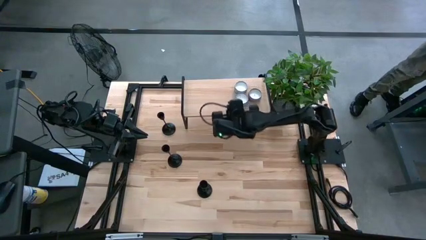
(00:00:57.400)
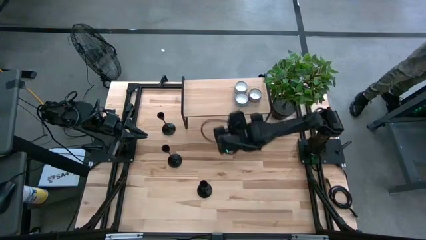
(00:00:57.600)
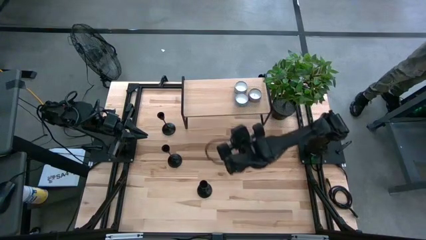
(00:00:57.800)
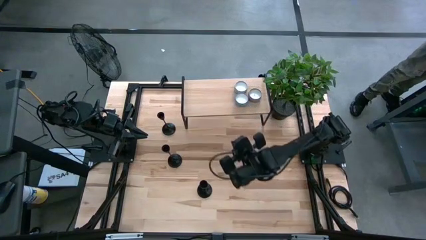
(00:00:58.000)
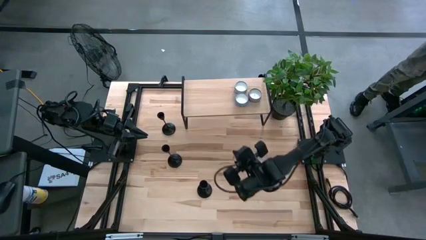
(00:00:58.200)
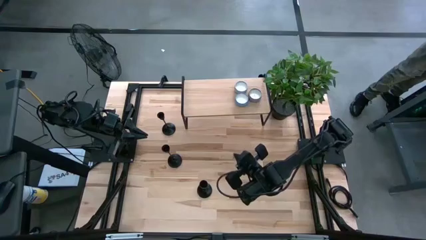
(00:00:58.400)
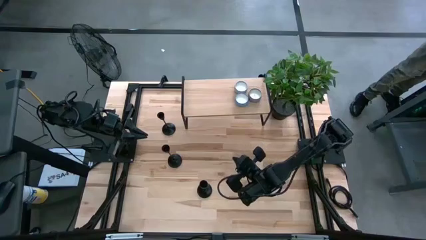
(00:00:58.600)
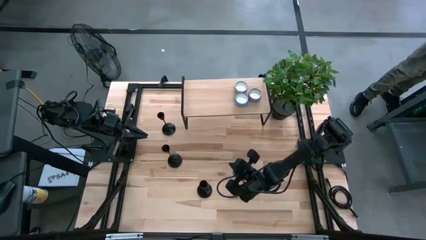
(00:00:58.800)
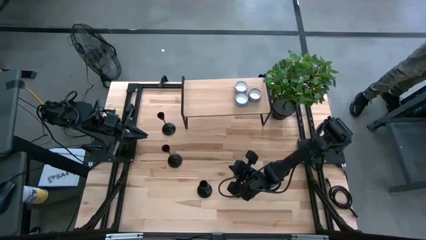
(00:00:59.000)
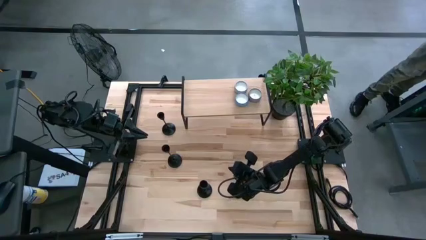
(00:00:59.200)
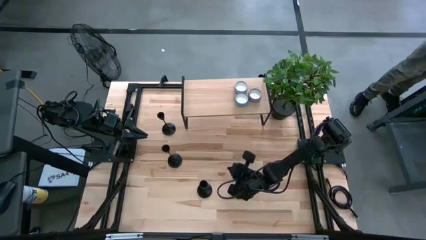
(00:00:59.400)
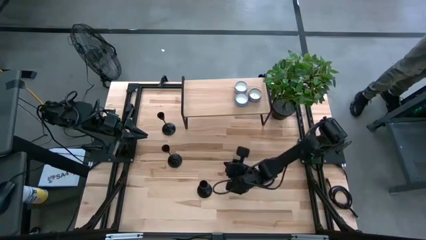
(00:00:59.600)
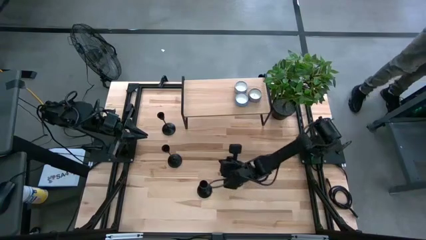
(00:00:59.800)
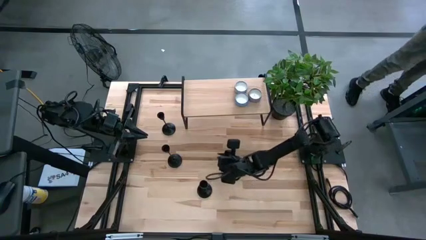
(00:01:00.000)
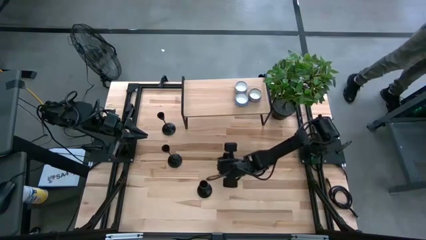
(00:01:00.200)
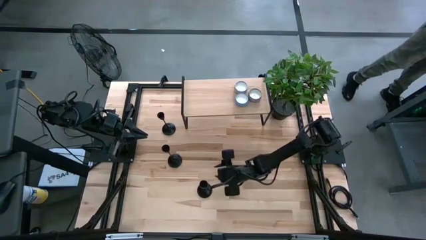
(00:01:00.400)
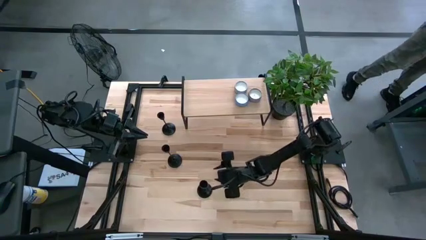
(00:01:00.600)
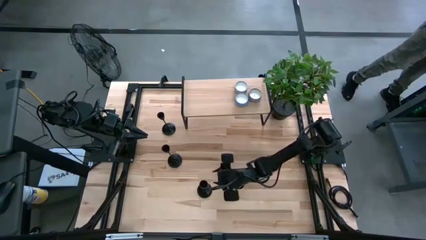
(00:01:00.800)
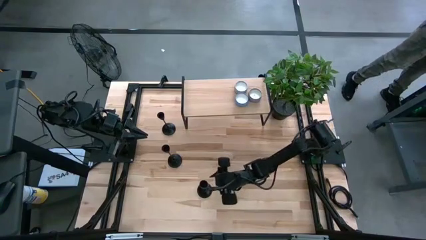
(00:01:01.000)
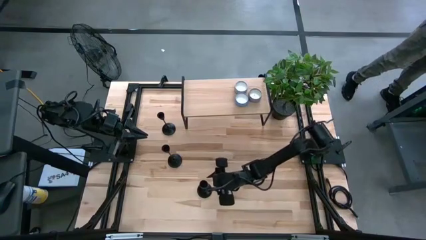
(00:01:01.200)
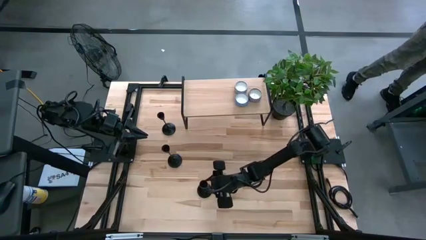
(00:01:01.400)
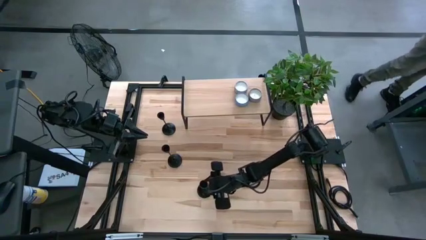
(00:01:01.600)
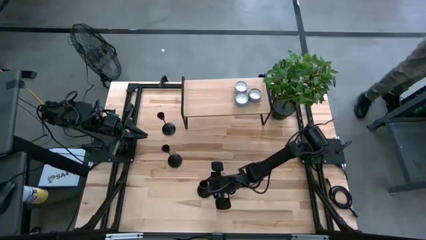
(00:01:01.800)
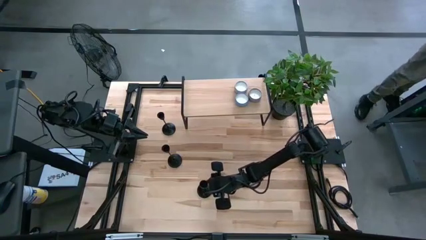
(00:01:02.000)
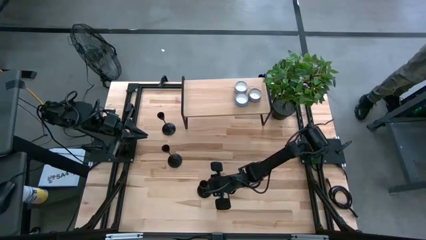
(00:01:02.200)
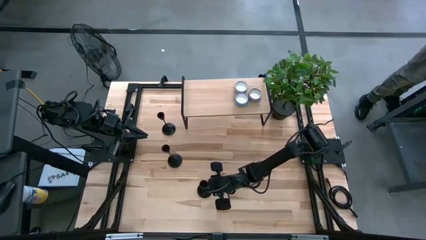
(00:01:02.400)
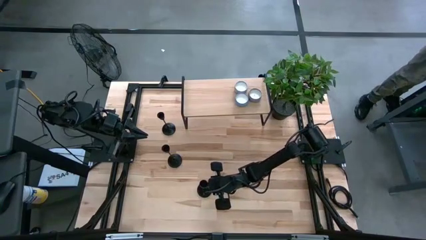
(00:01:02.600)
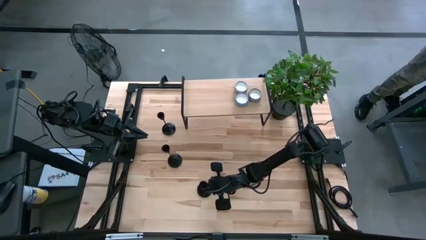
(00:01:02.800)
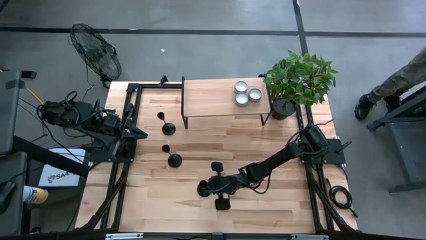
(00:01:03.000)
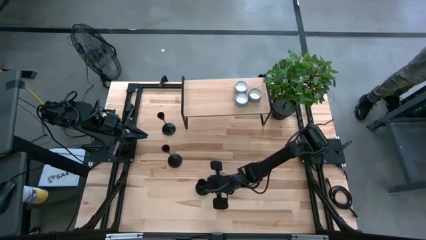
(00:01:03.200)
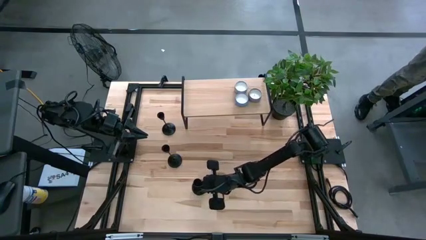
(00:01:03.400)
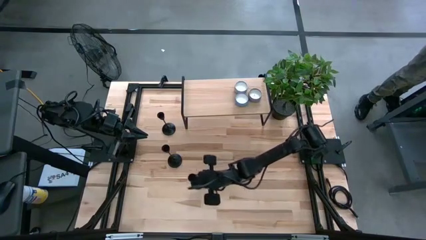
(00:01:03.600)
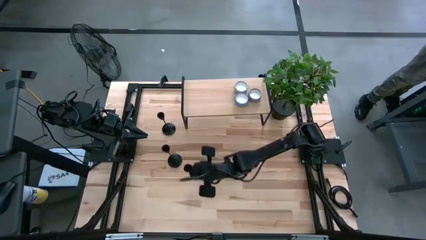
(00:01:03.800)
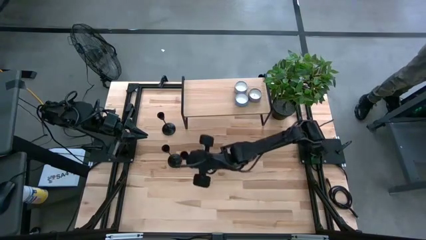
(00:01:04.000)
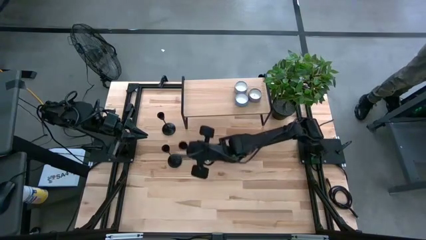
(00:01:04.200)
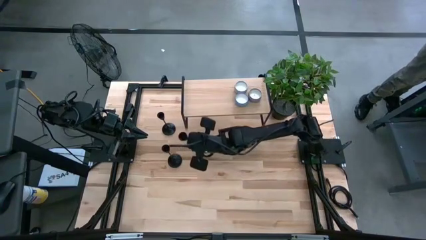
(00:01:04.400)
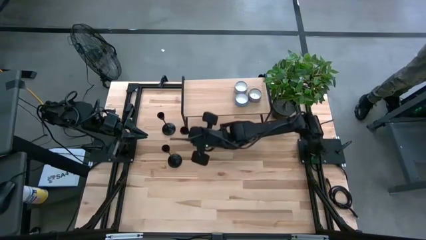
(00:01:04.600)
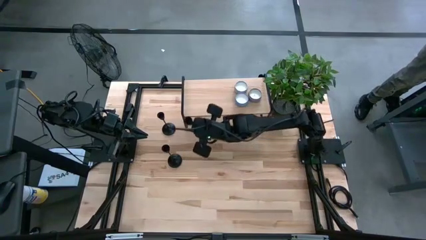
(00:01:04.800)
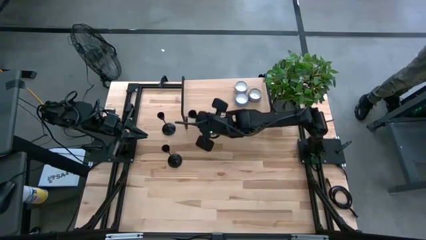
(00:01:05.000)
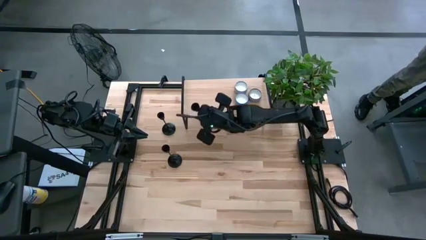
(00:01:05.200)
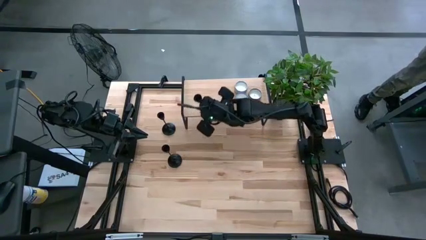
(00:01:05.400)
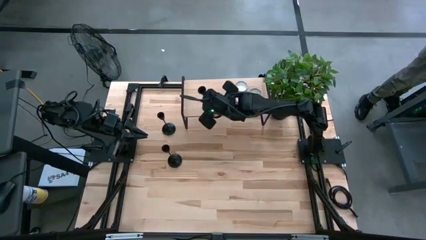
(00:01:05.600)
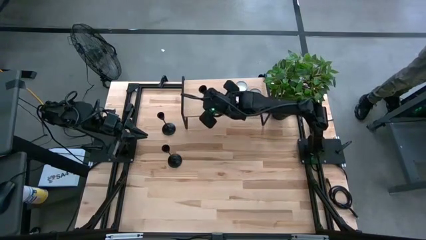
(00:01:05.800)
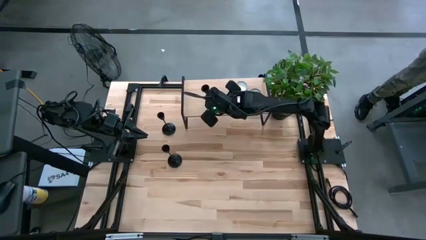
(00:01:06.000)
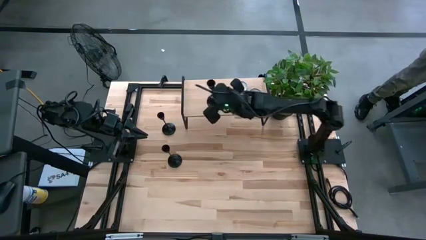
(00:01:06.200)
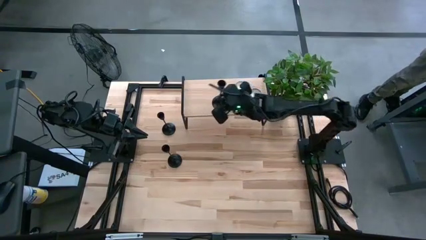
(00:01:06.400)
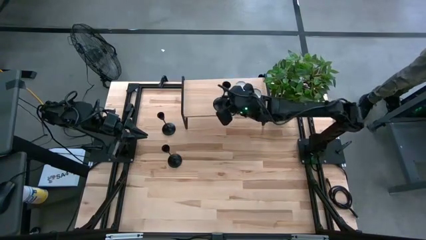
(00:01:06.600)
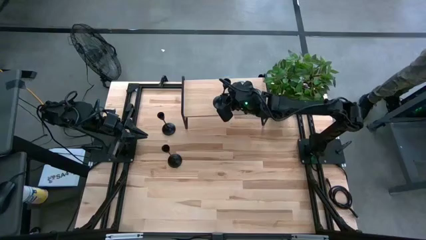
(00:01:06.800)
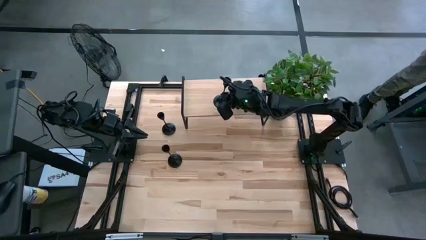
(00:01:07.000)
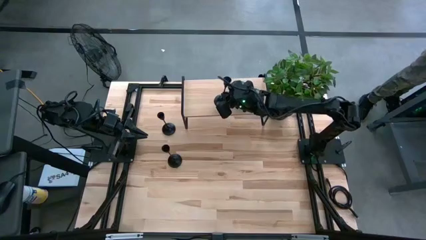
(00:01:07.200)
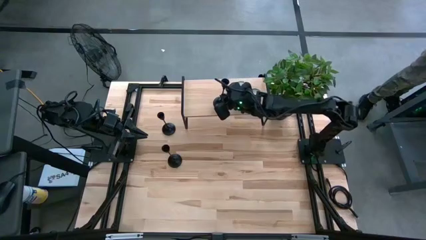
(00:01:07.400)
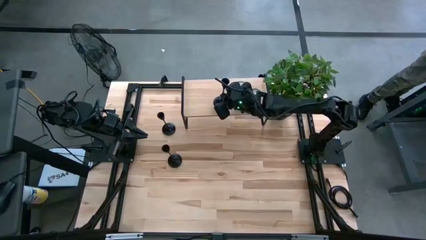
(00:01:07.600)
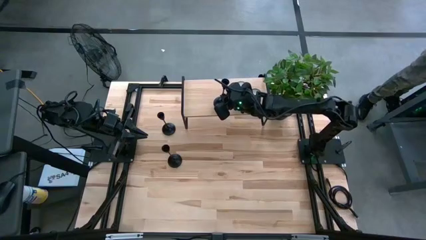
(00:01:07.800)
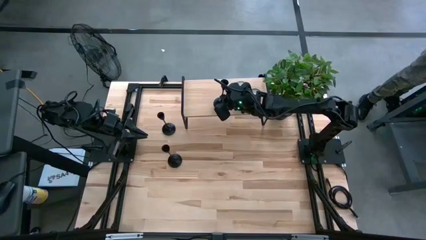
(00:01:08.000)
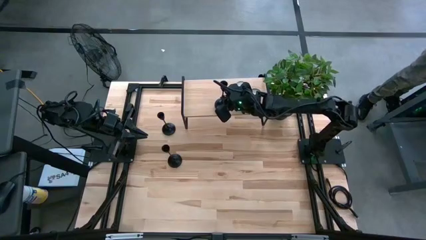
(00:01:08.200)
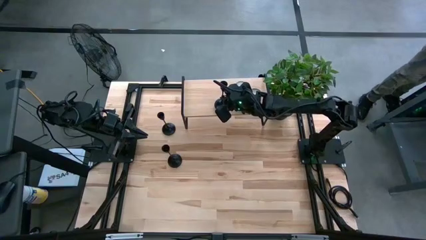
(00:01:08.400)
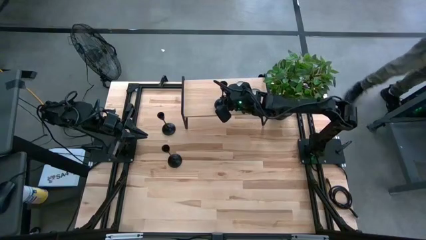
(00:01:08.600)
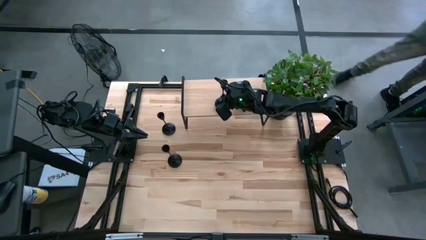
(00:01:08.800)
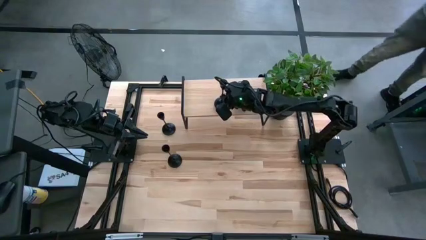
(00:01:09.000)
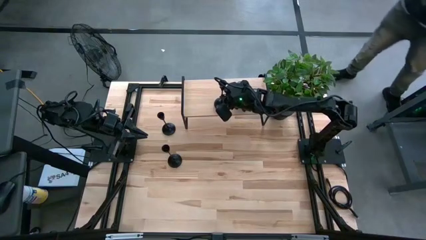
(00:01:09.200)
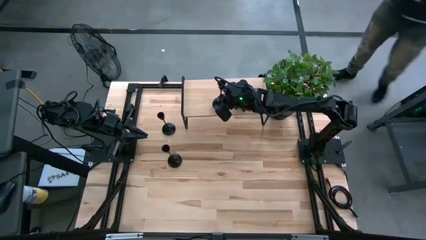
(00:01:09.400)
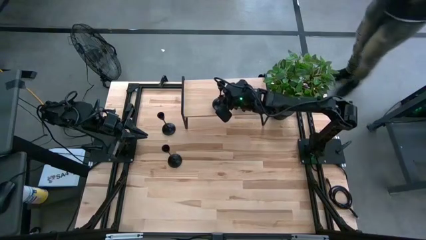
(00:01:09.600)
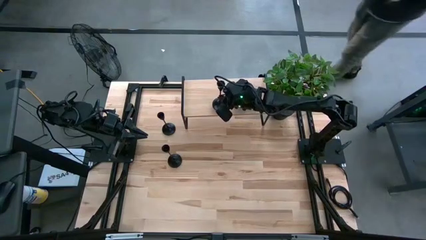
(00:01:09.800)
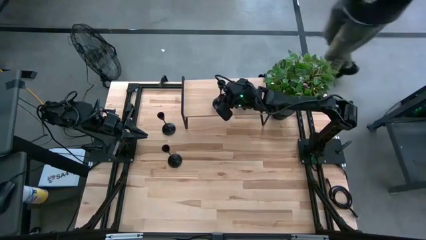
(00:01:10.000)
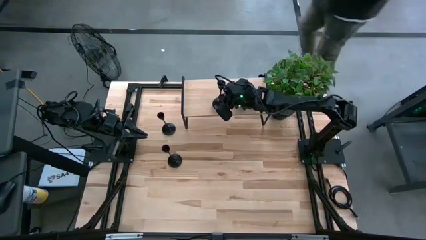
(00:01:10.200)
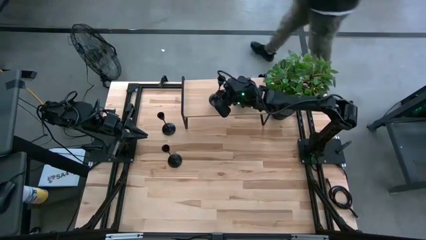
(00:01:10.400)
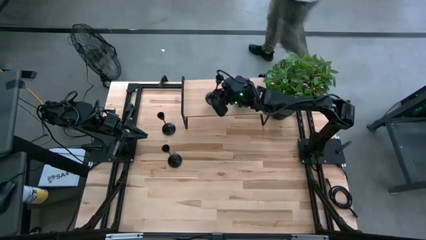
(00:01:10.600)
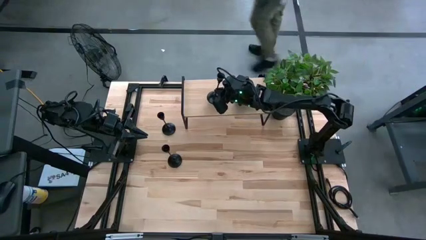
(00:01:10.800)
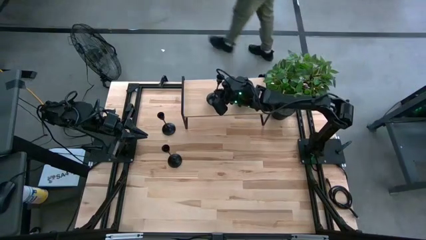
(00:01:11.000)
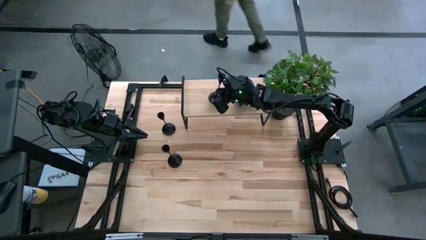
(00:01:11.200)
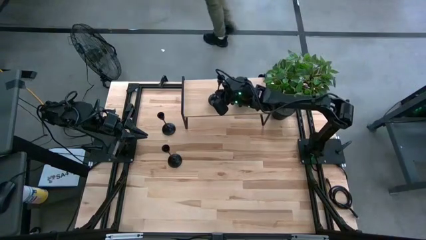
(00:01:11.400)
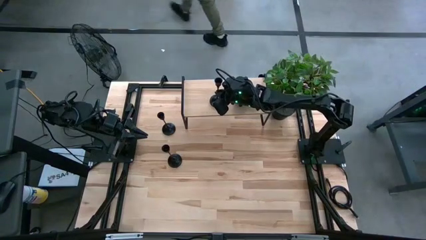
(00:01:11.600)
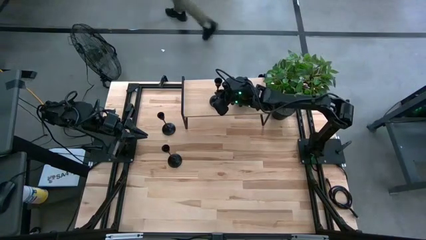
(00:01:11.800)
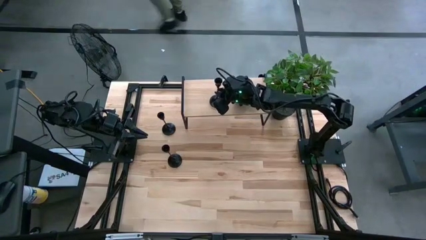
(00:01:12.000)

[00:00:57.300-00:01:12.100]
Task: Pick & Place candle stick holders
Put the black candle holder on the shelf
